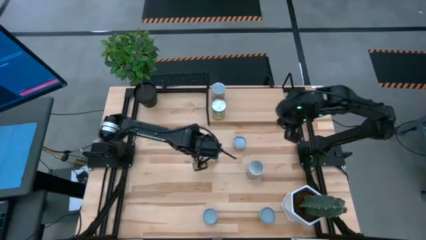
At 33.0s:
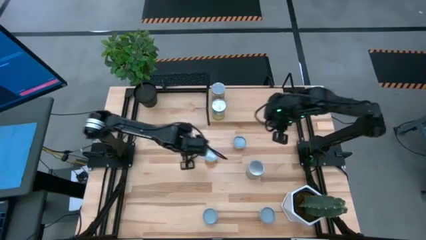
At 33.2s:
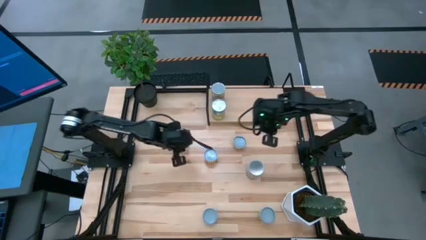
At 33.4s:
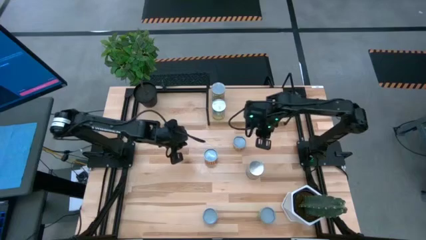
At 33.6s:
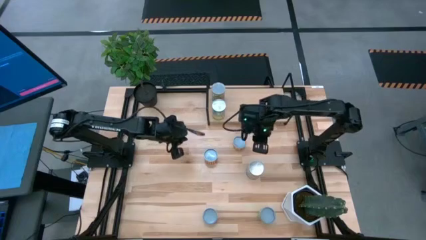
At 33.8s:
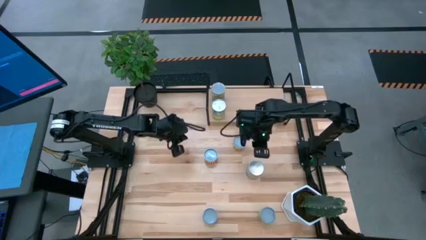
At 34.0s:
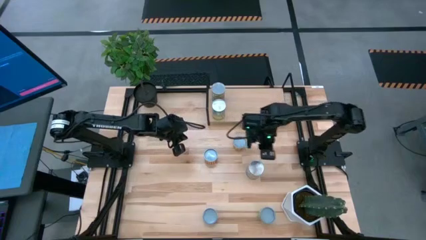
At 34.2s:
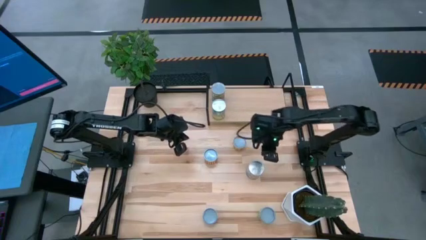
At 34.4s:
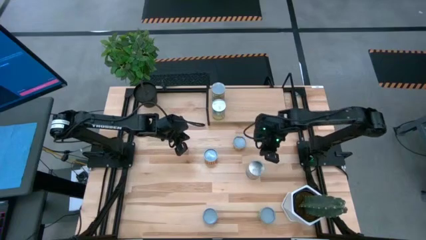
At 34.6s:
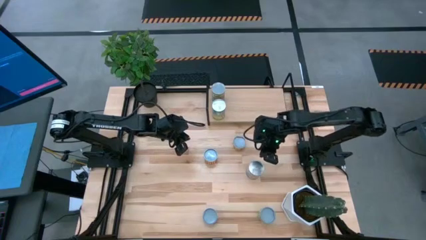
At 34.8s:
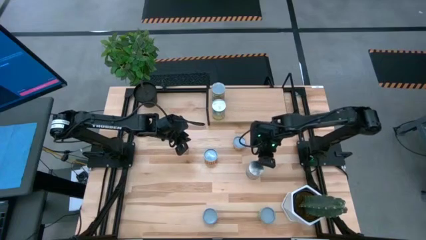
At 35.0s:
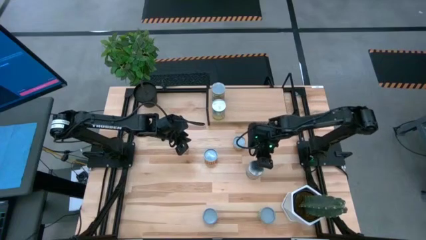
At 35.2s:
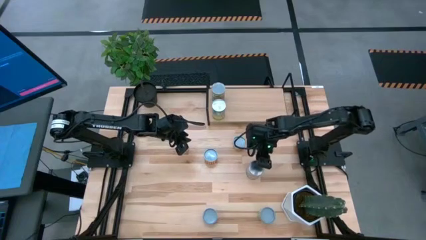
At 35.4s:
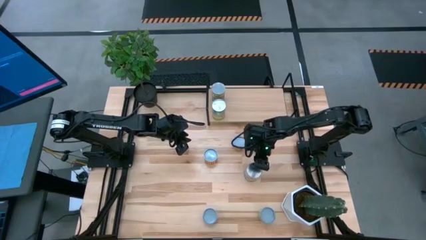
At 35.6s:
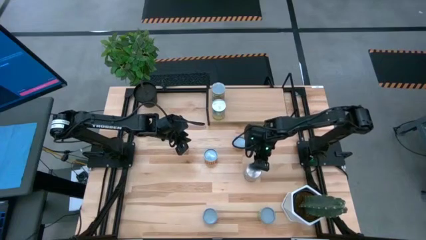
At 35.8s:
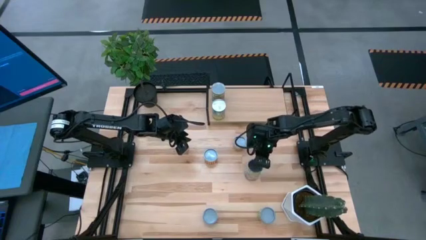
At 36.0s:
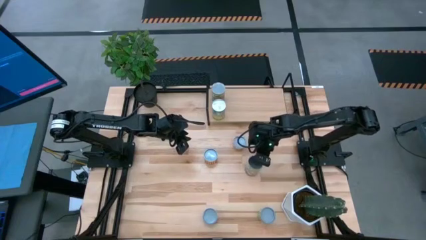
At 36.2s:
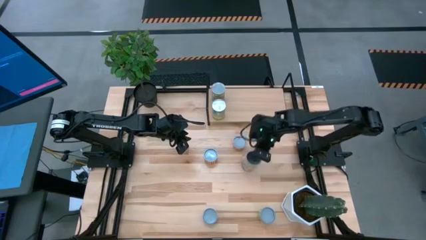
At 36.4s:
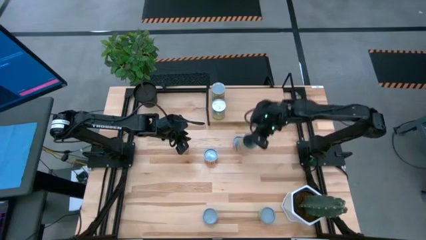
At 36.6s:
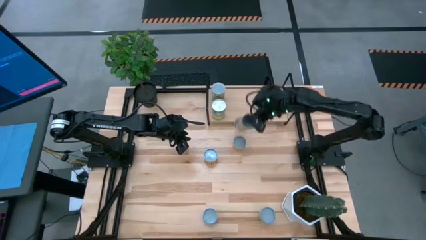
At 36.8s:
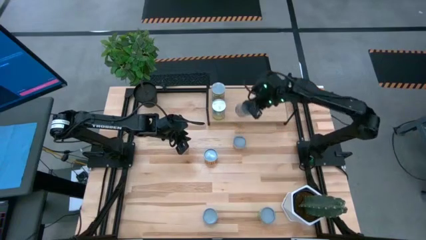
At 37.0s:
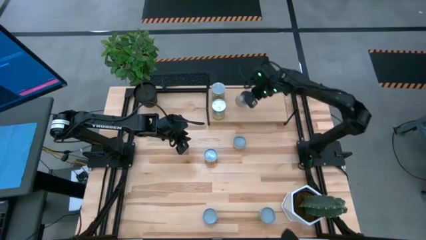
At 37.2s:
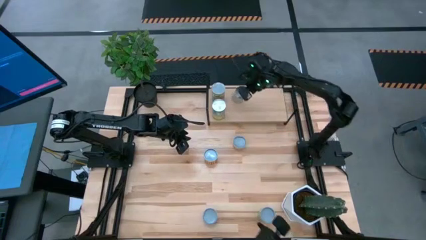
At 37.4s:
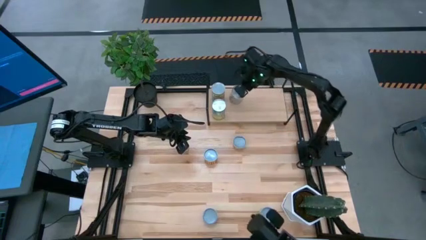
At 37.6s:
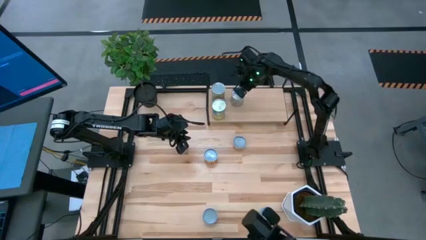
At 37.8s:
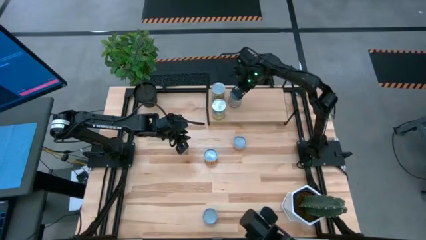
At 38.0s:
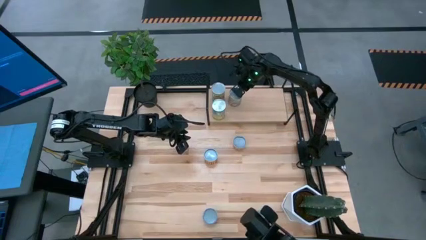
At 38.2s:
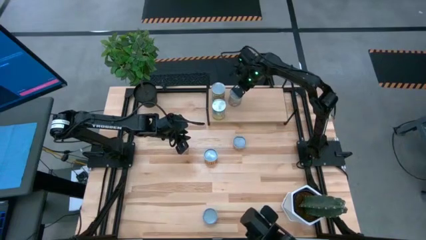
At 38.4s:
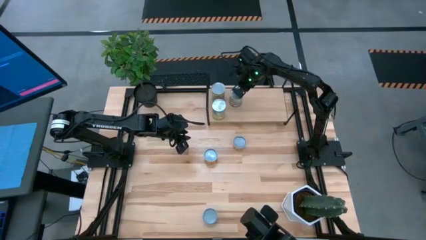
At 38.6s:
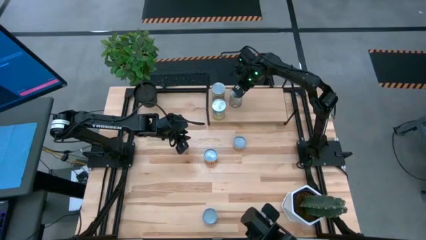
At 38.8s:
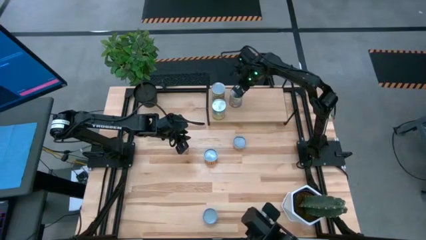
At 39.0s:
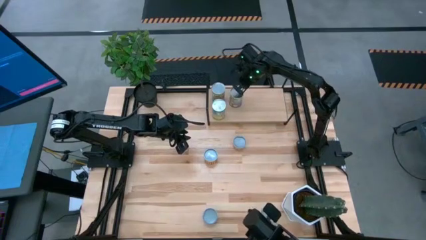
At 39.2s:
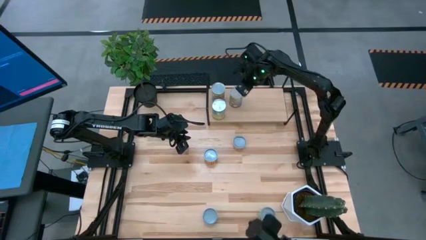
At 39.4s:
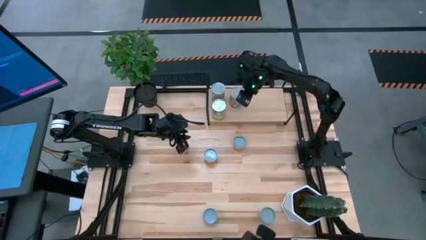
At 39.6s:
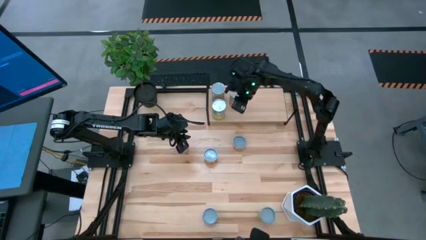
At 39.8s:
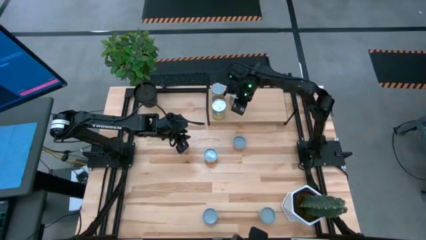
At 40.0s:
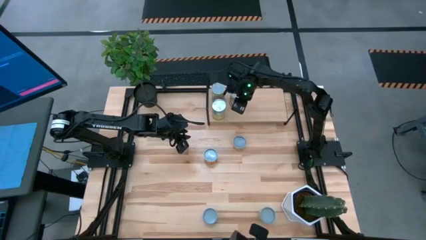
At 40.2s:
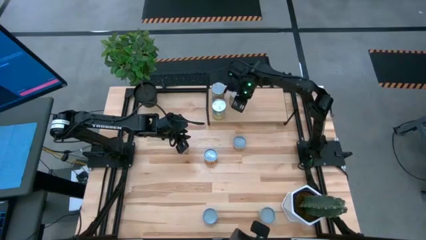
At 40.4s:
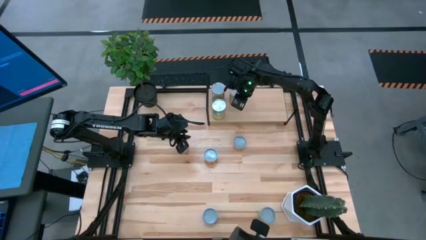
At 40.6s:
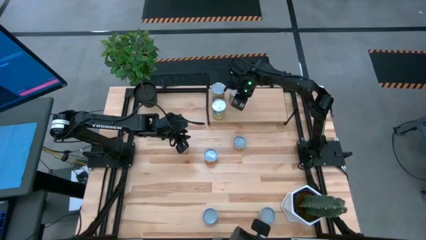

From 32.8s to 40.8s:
Task: Pick and place cans onto a shelf
Put the canned peaches on the shelf

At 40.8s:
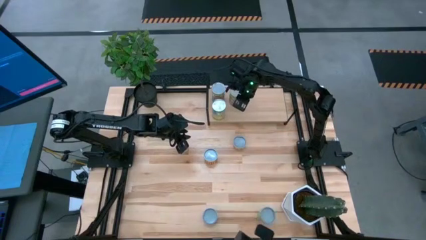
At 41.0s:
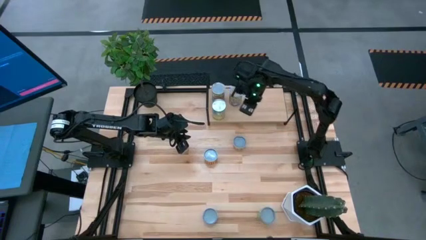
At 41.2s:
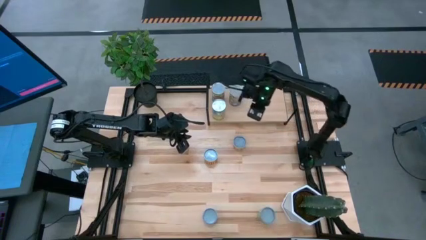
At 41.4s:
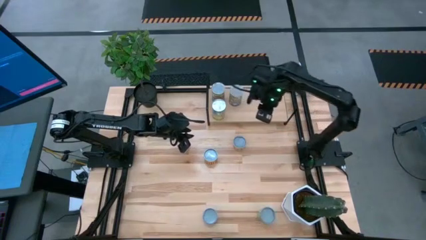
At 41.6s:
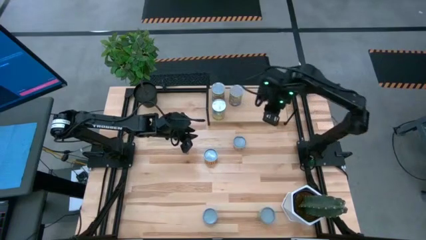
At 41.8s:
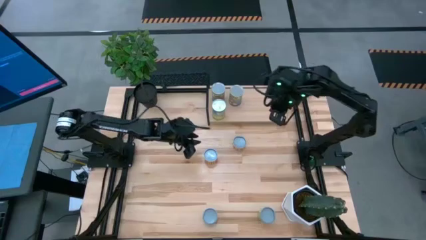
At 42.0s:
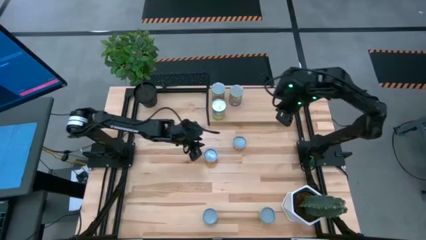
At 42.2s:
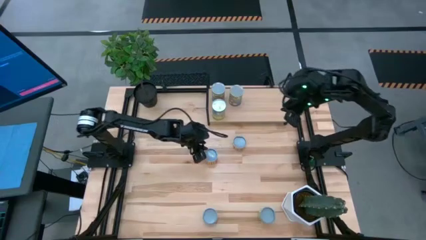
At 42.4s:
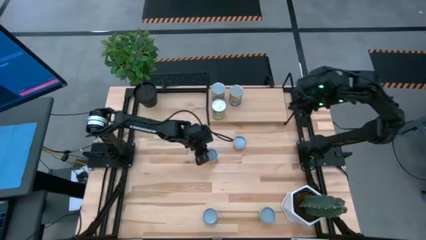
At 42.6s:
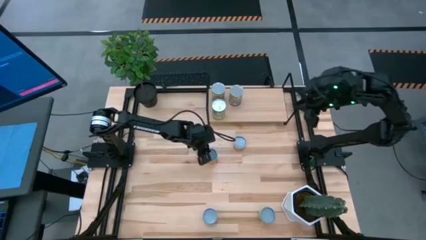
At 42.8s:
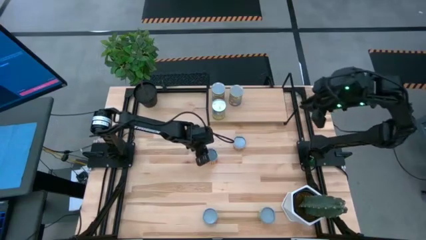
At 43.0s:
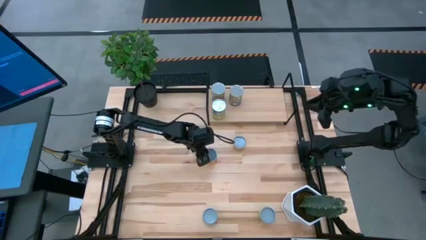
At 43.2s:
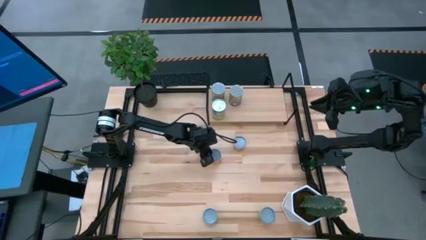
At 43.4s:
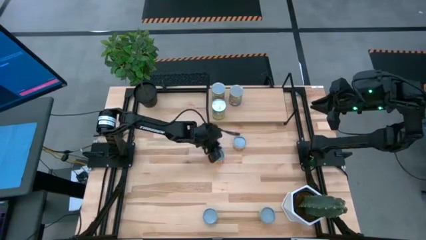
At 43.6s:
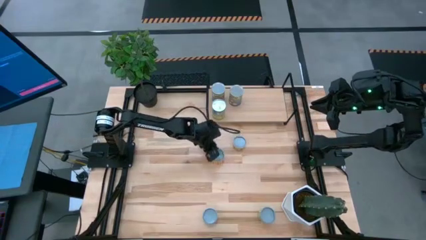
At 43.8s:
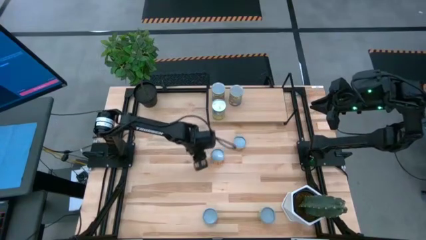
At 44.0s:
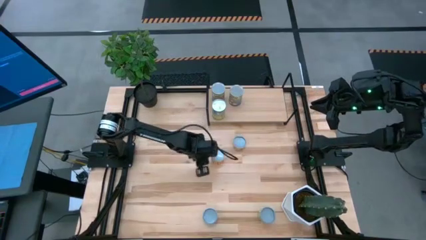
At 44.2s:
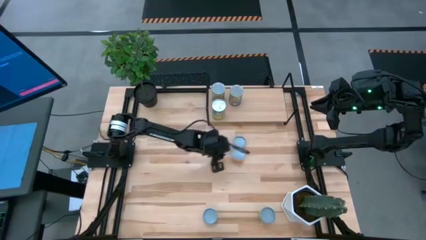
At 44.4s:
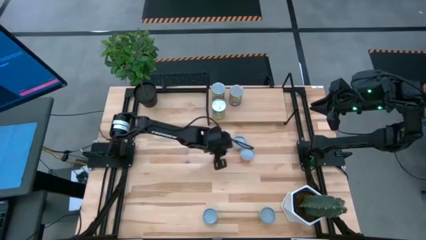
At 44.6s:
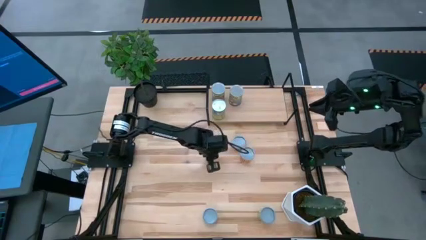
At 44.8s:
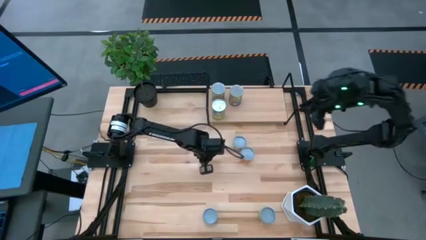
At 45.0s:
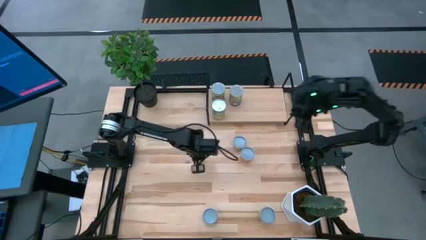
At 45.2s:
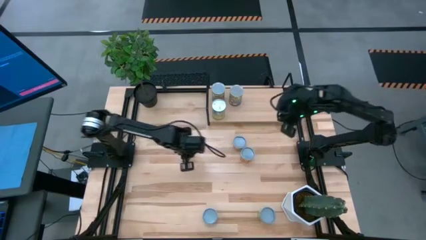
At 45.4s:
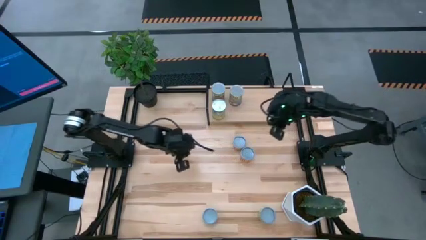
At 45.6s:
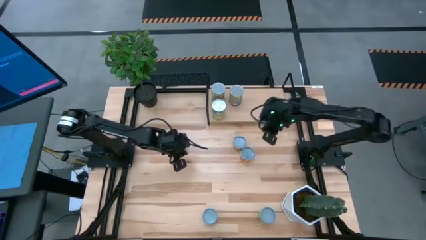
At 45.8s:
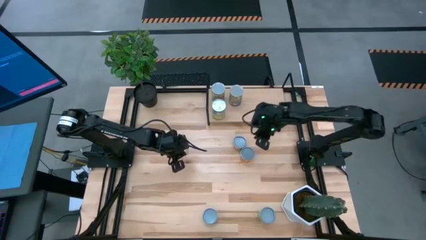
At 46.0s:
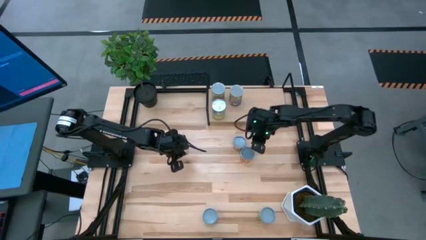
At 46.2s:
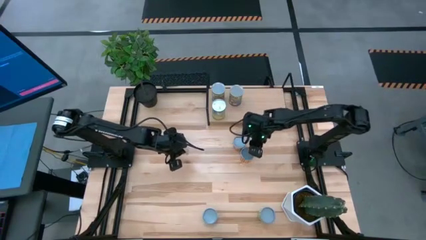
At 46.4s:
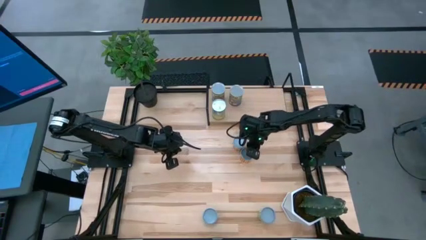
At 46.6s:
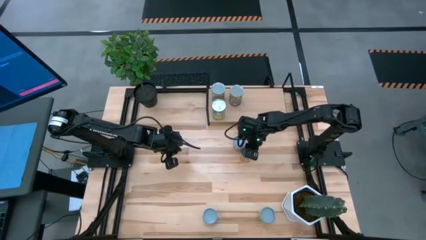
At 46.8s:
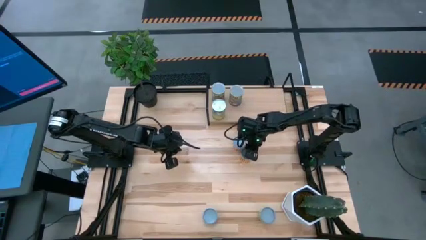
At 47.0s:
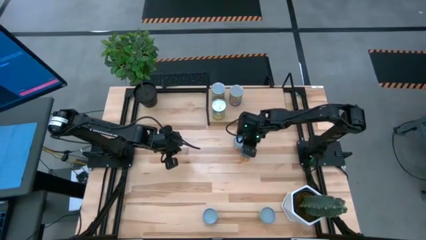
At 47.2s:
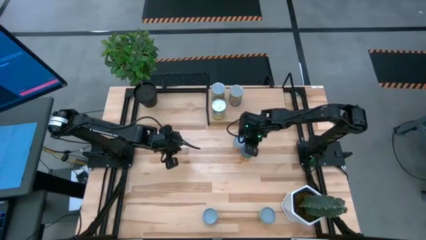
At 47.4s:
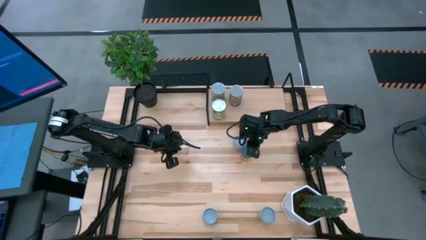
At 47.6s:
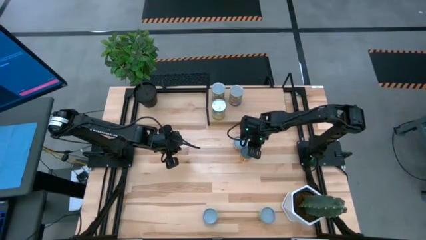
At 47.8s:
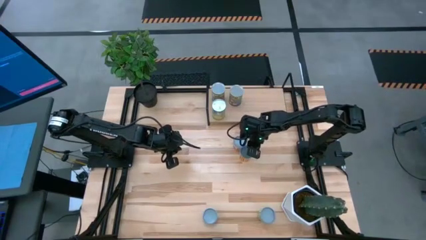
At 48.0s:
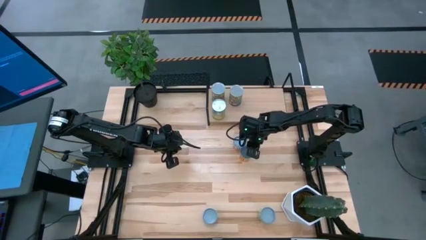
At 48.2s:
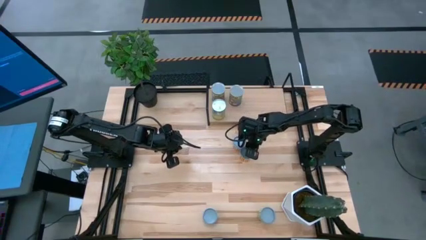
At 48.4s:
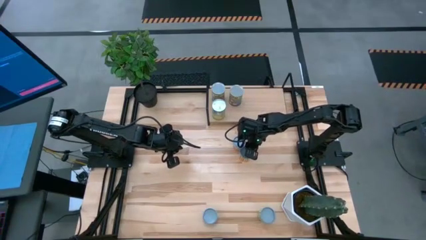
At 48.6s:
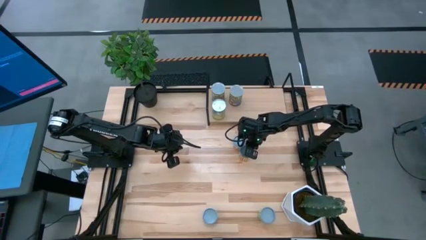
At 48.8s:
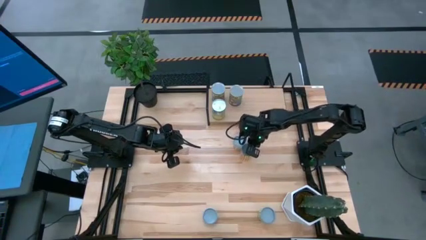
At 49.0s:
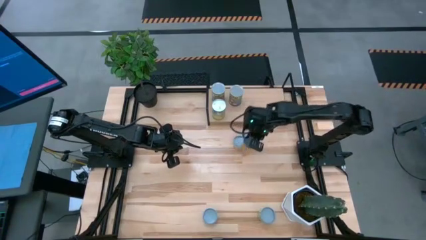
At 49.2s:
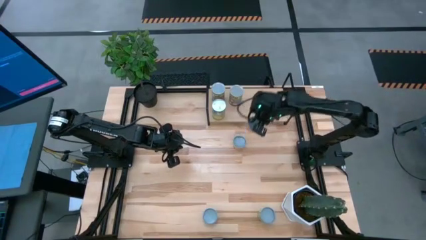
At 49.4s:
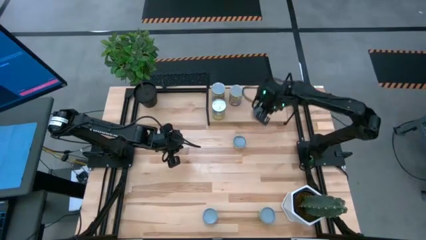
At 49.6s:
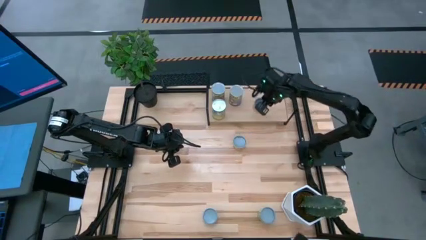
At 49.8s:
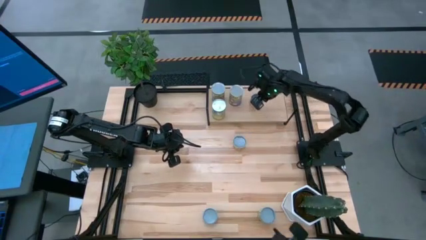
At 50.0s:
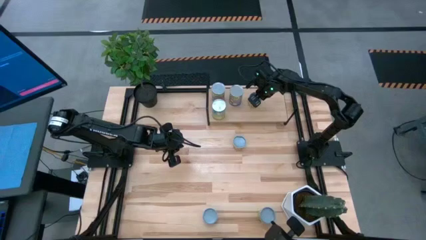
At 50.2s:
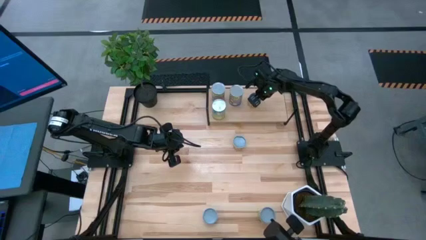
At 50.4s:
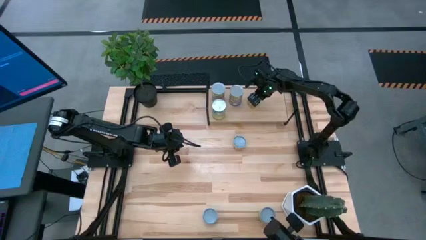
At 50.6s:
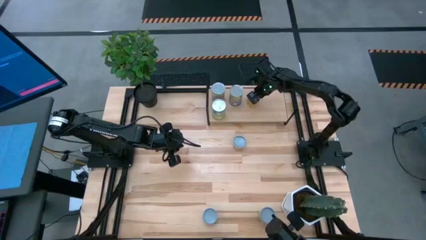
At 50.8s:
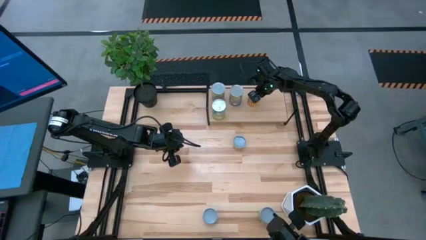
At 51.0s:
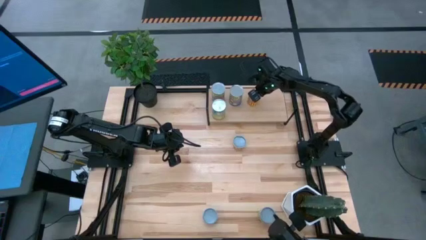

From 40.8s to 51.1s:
Put the canned beans on the shelf
